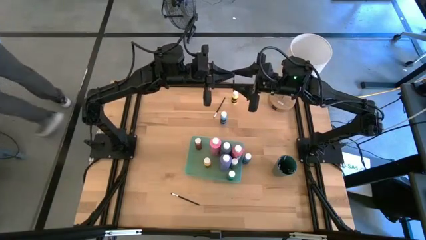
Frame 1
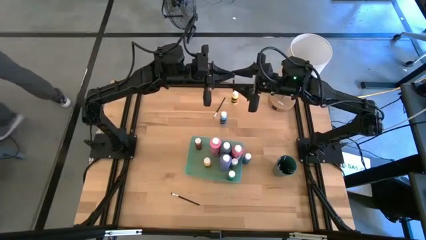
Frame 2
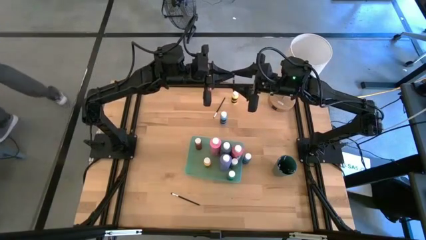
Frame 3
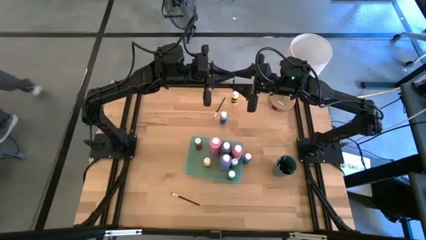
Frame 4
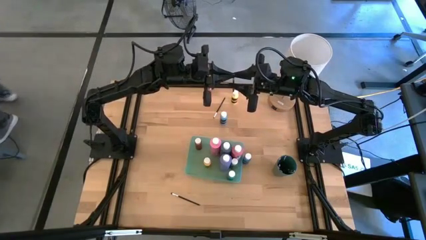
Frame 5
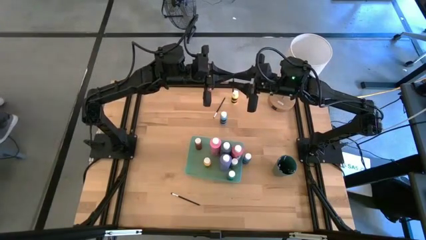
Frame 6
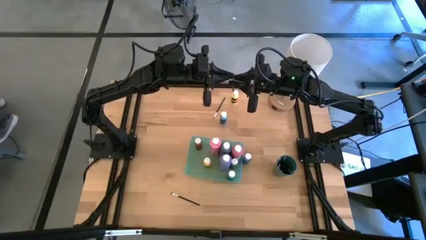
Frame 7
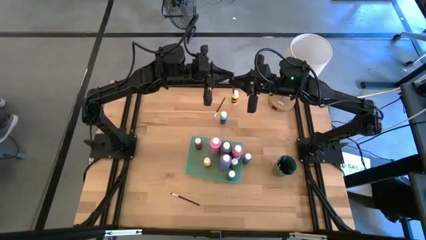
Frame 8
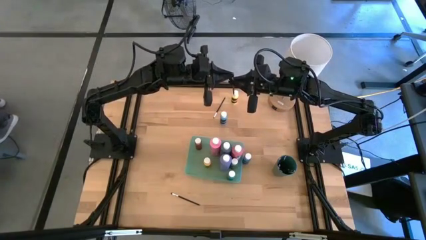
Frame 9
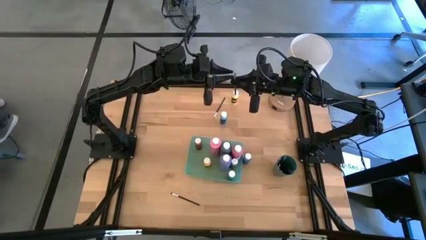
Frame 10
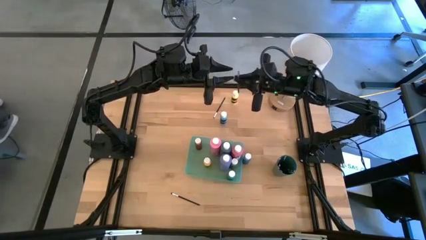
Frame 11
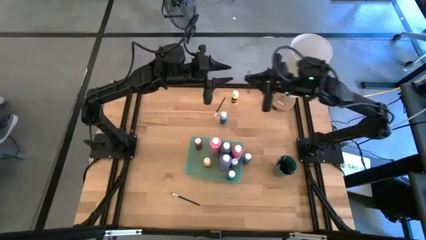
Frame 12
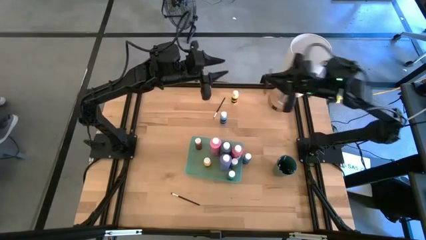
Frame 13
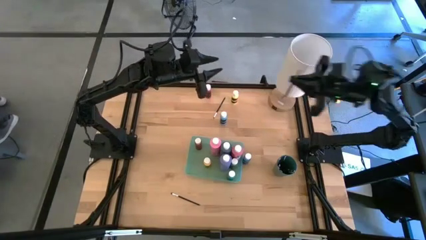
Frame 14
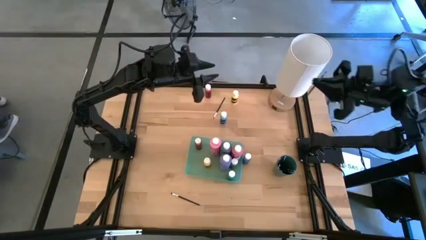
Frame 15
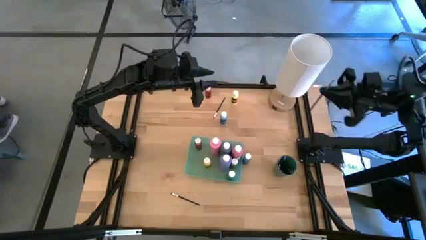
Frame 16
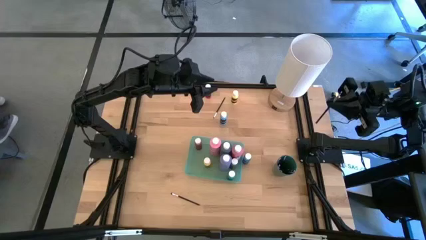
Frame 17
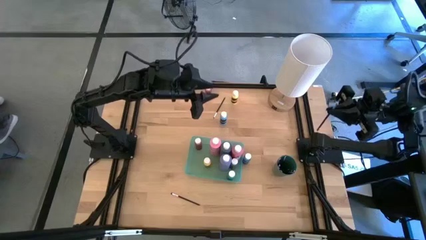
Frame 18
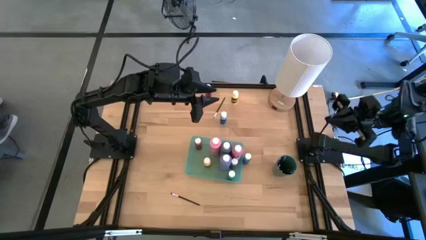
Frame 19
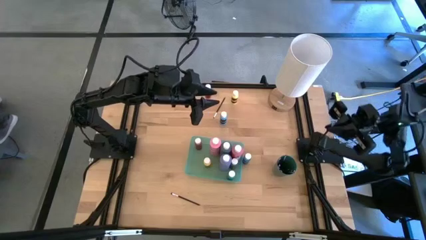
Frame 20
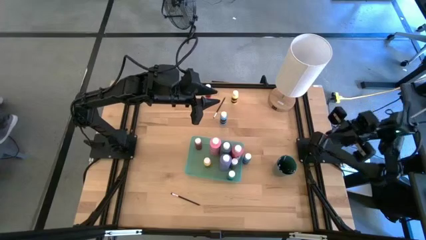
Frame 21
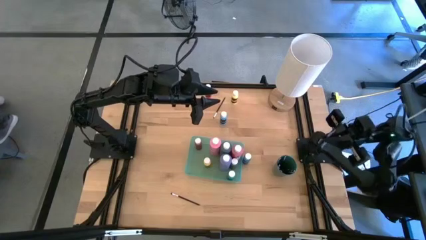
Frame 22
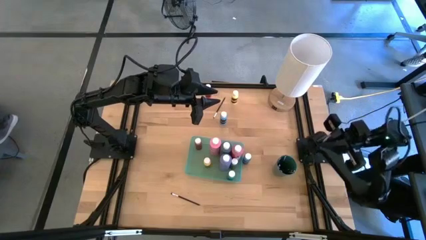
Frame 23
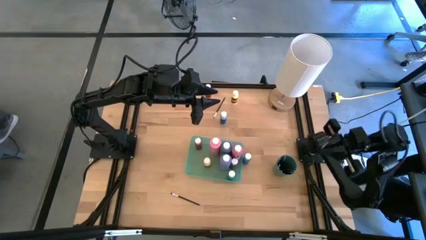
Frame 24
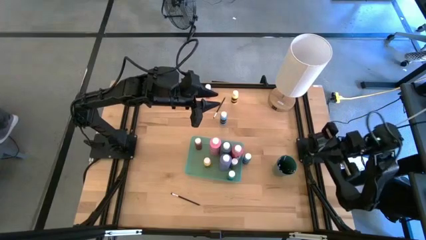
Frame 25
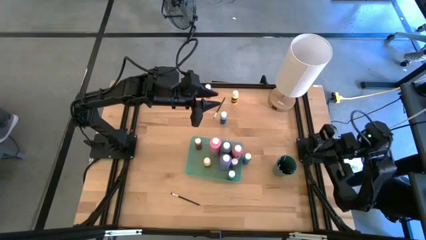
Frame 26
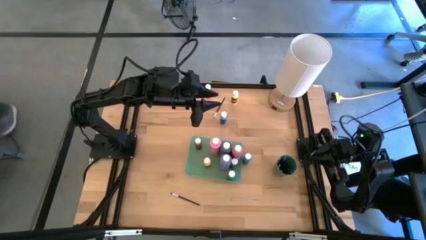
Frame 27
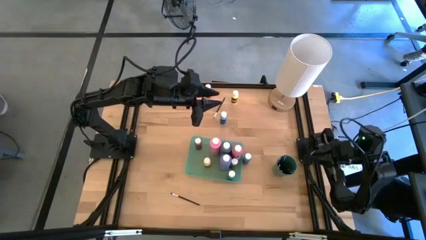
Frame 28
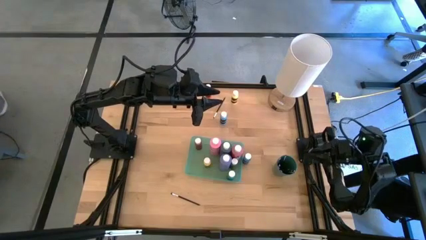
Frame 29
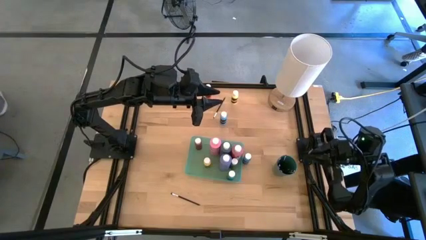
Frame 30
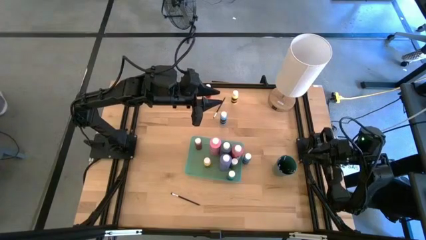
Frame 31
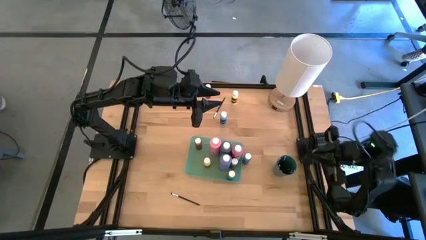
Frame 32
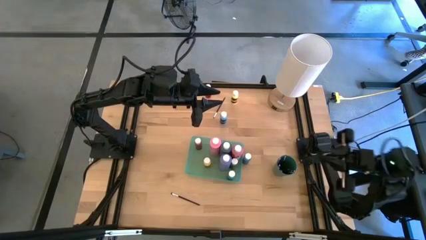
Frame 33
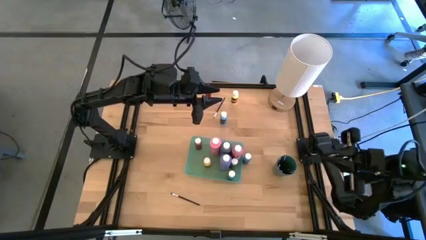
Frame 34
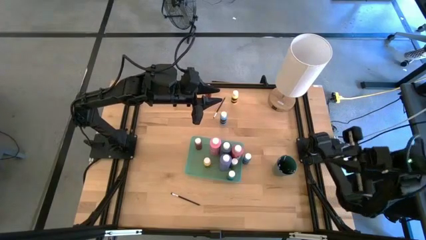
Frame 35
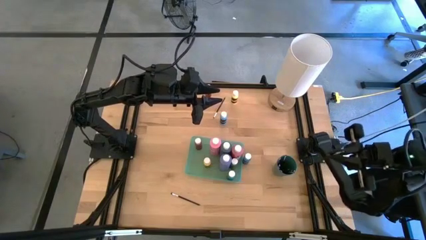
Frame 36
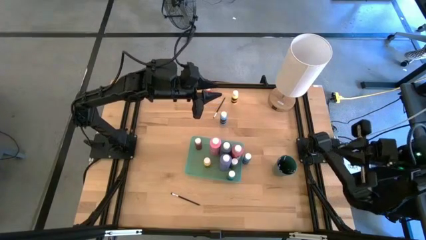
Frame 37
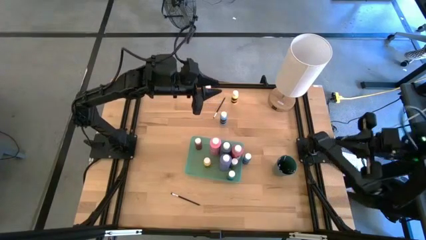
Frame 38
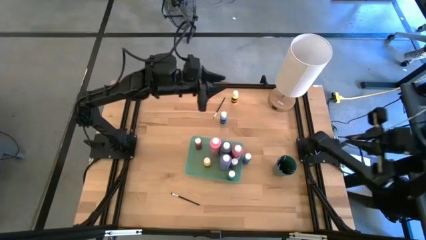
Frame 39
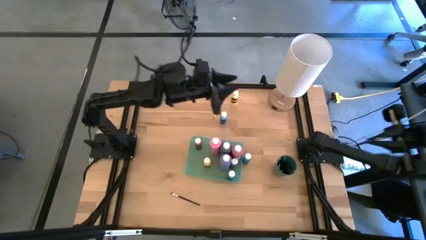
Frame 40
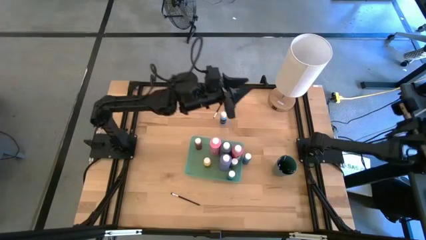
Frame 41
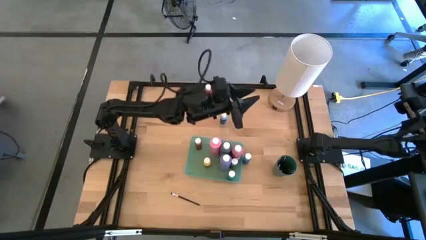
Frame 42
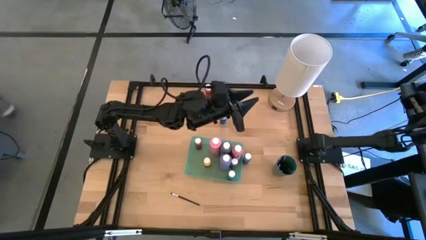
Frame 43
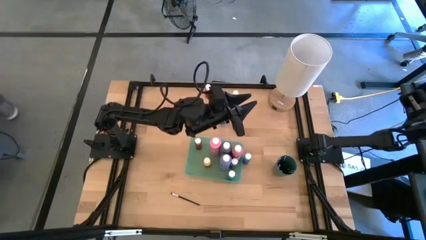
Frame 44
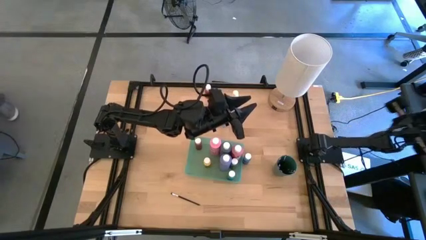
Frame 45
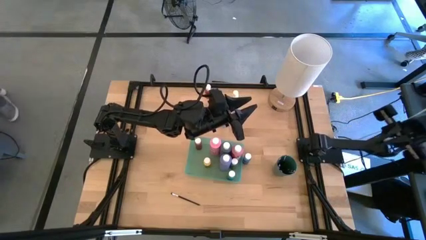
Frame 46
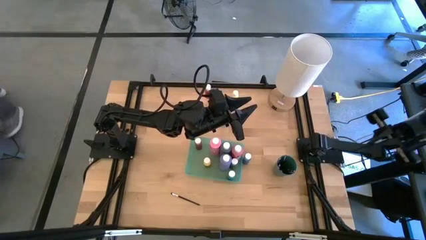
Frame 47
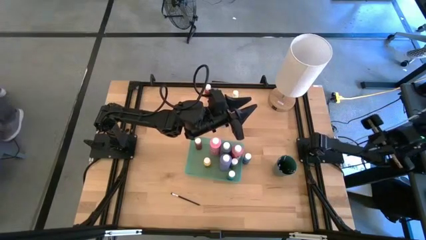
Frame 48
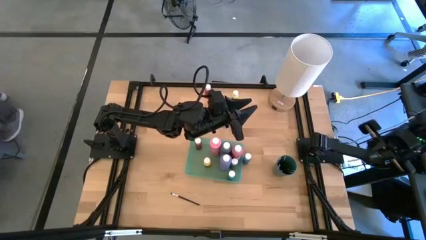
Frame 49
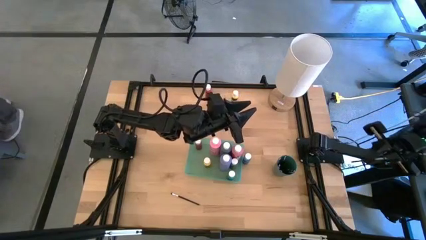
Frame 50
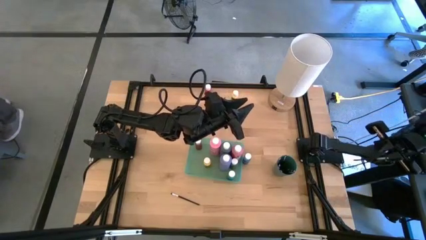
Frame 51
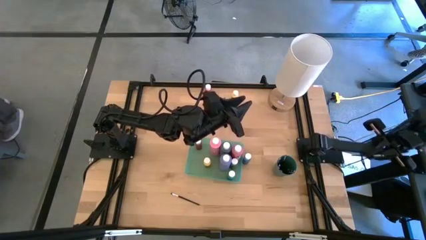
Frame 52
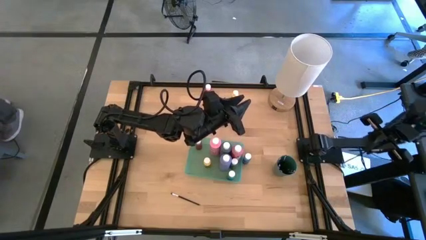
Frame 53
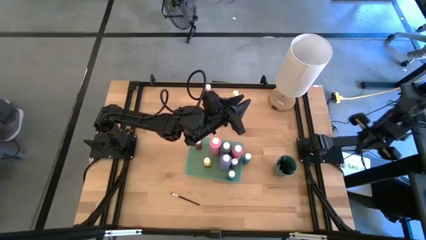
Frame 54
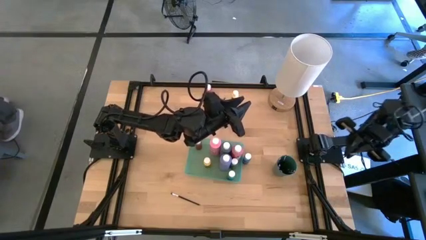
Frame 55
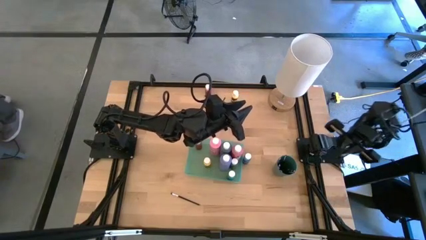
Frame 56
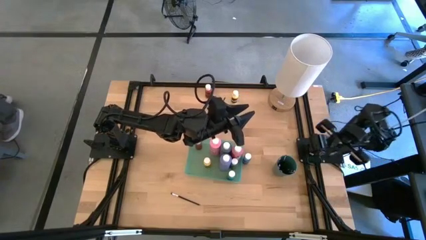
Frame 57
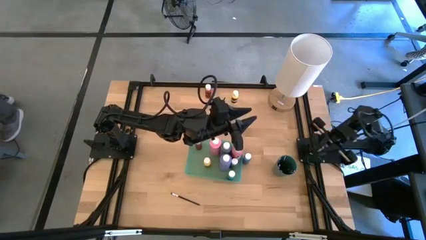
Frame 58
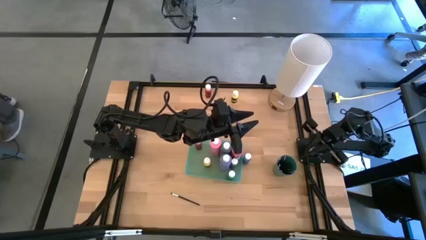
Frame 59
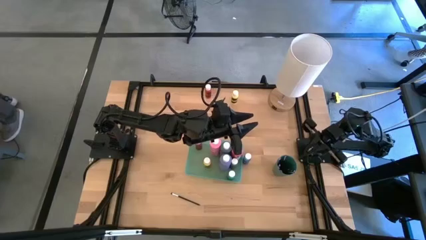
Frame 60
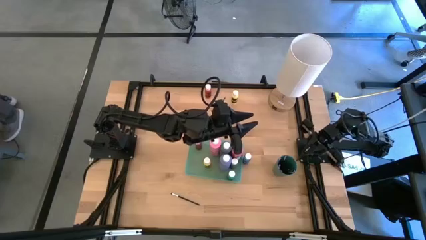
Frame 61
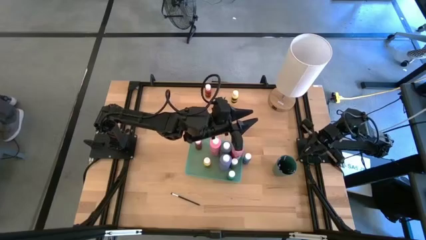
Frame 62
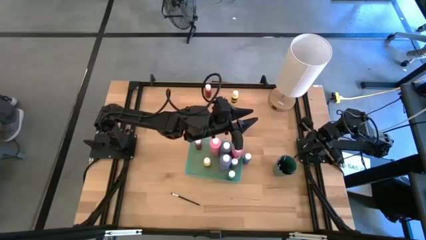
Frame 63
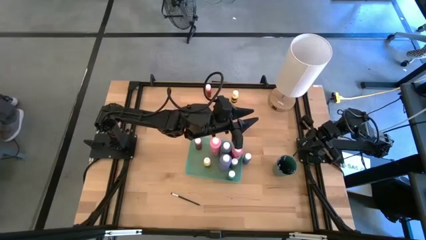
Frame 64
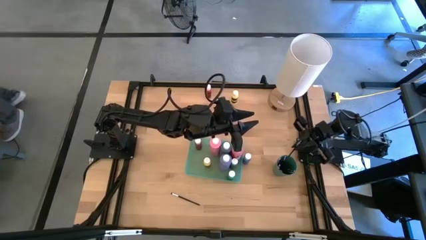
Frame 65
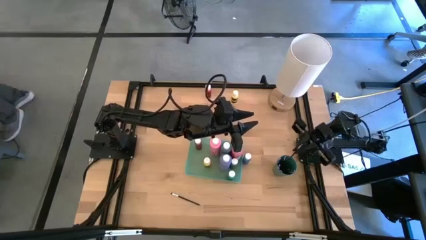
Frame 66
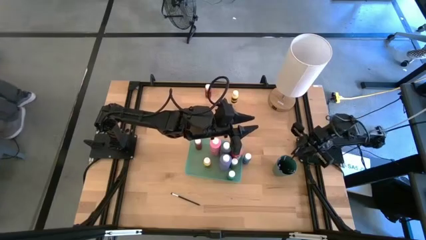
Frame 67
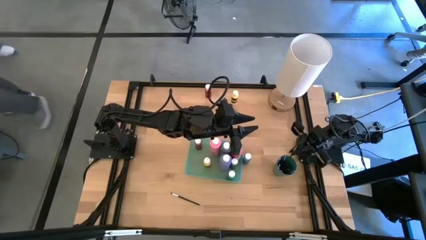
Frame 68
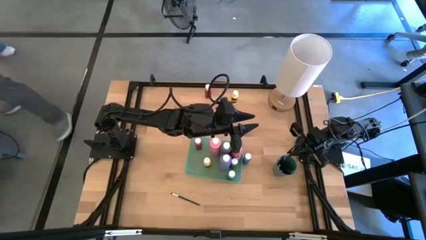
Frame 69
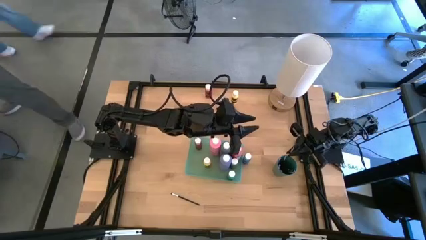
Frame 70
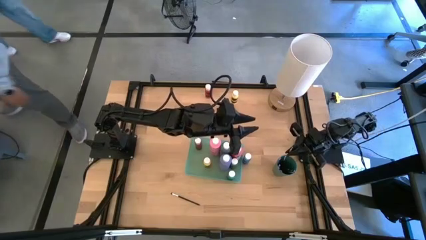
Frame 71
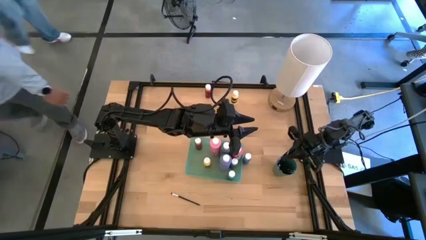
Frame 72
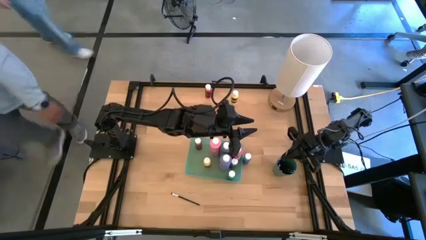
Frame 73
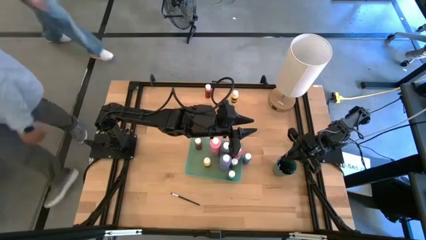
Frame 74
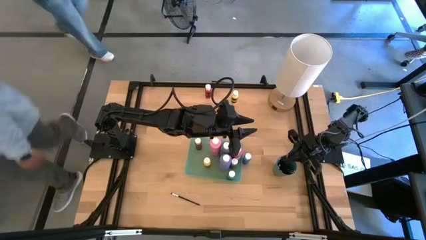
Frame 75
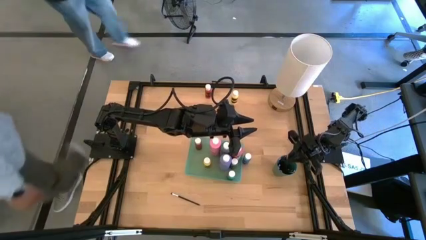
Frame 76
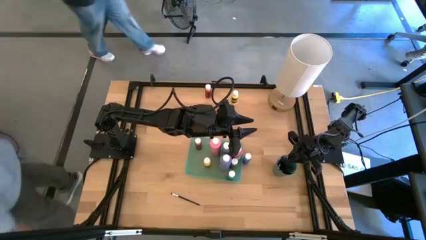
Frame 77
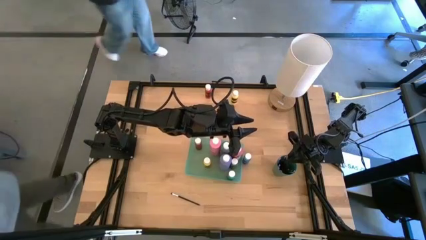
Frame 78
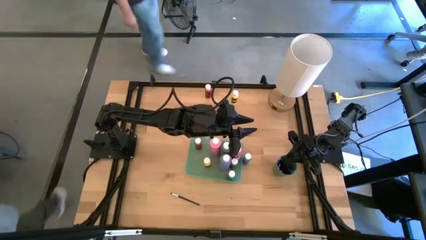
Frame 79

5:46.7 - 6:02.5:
Task: Pick & Place Paint Supplies
Put the black eyeshadow brush into the green cup
